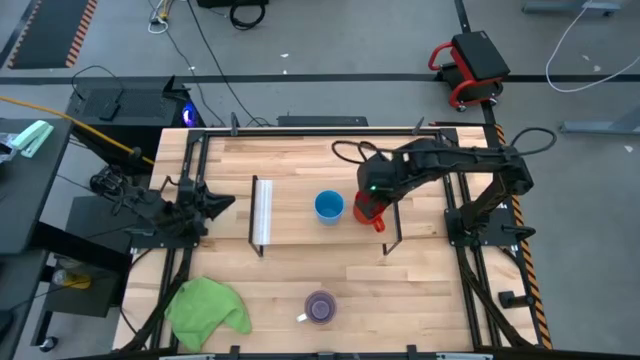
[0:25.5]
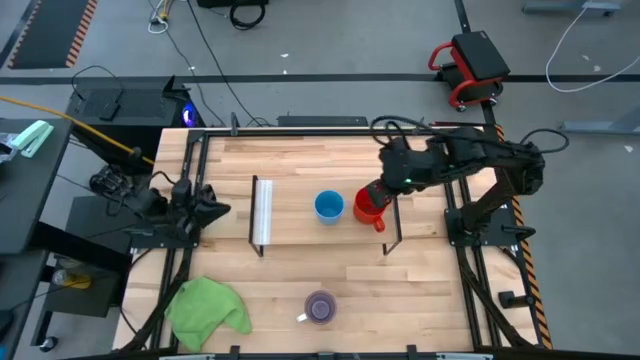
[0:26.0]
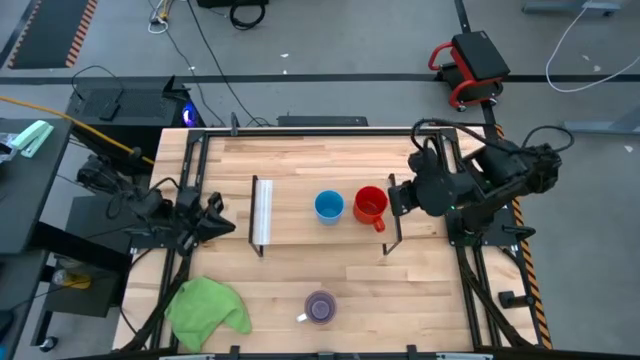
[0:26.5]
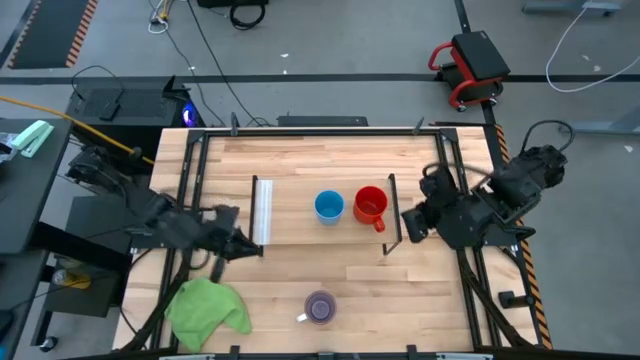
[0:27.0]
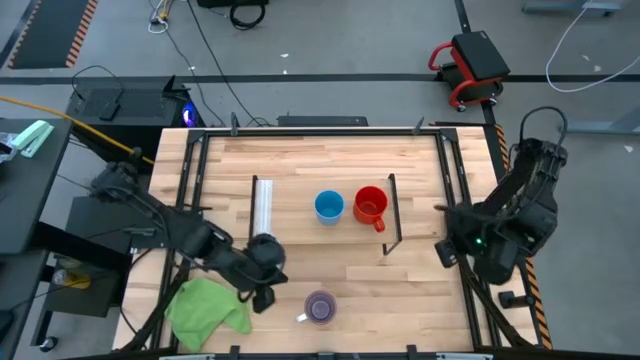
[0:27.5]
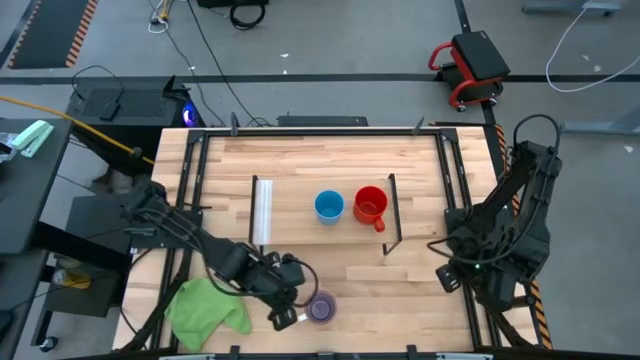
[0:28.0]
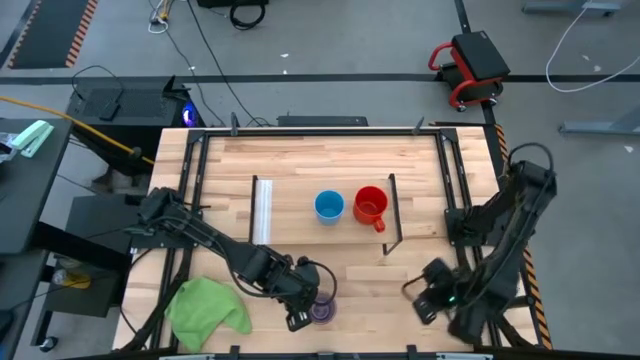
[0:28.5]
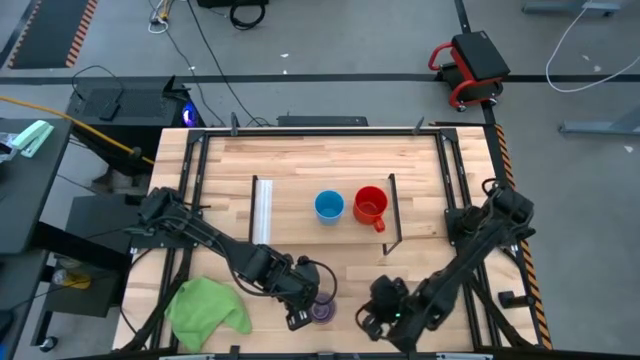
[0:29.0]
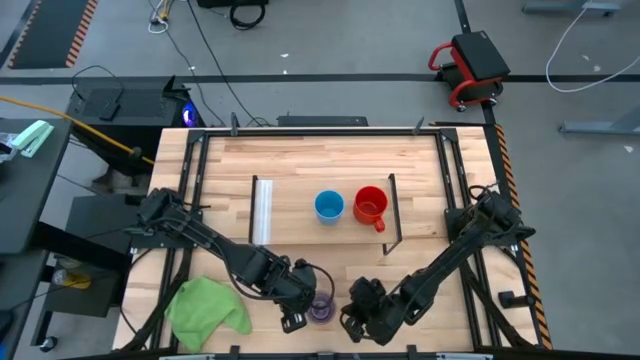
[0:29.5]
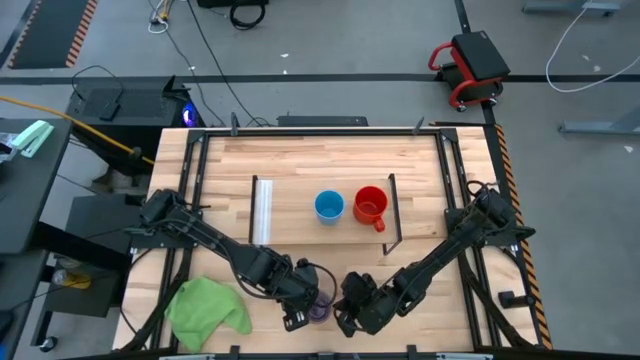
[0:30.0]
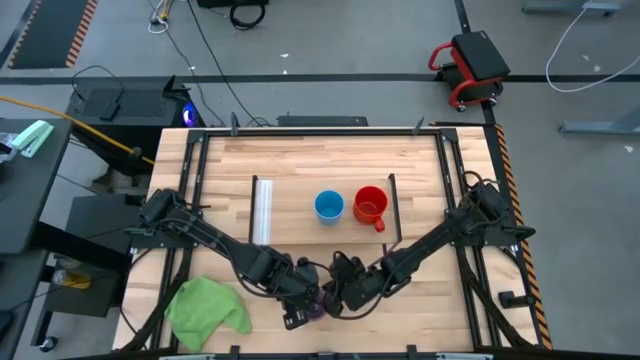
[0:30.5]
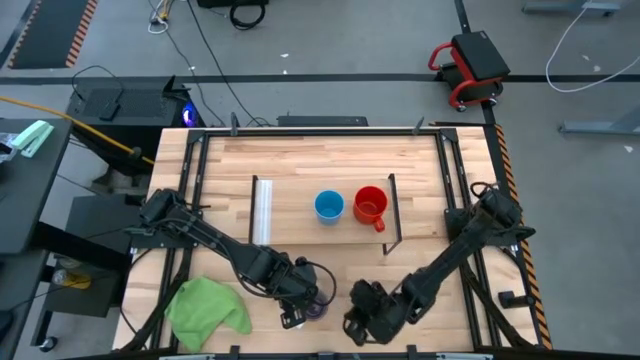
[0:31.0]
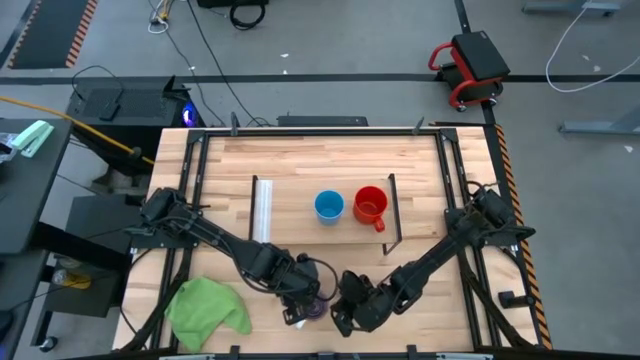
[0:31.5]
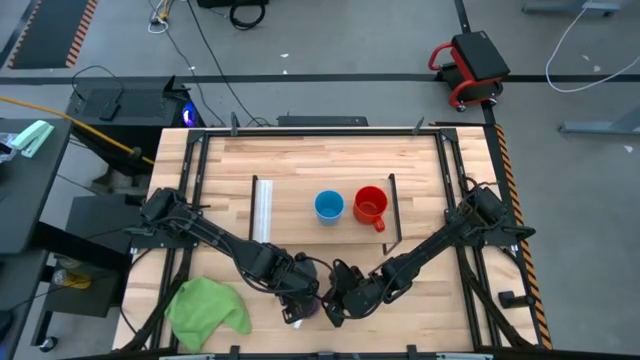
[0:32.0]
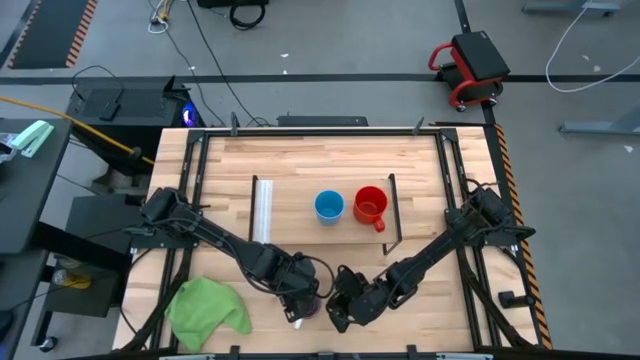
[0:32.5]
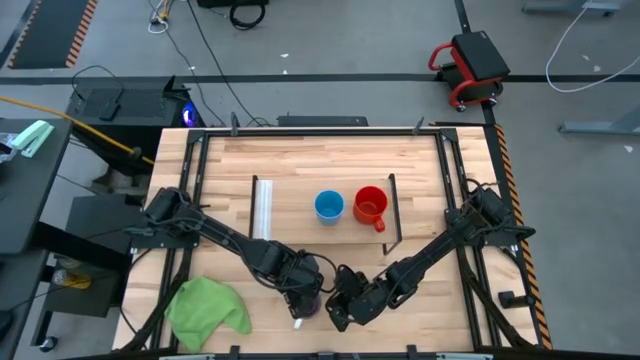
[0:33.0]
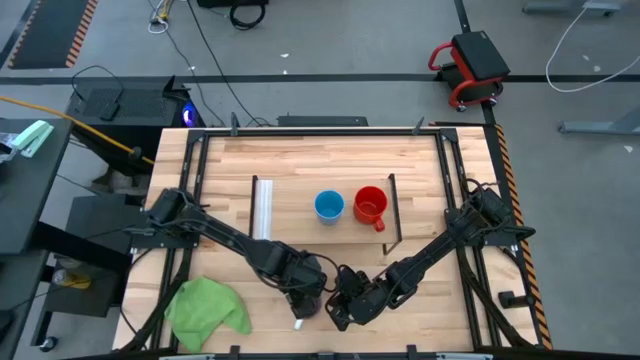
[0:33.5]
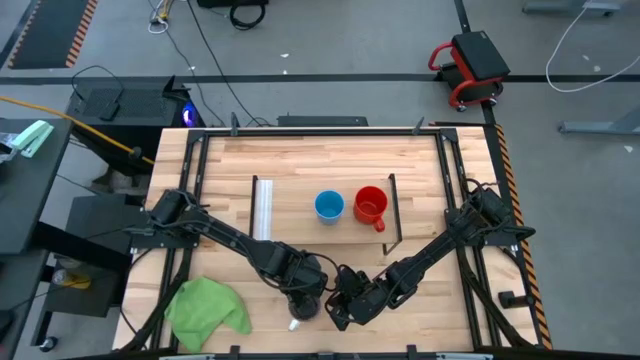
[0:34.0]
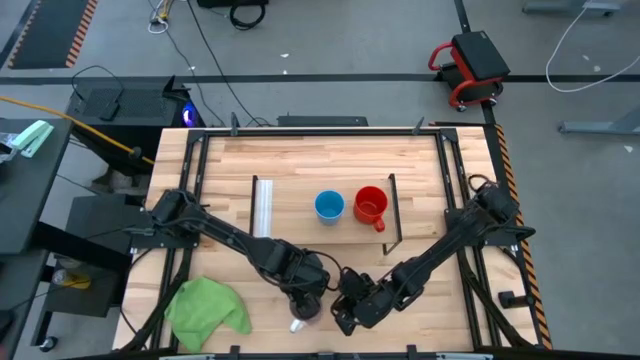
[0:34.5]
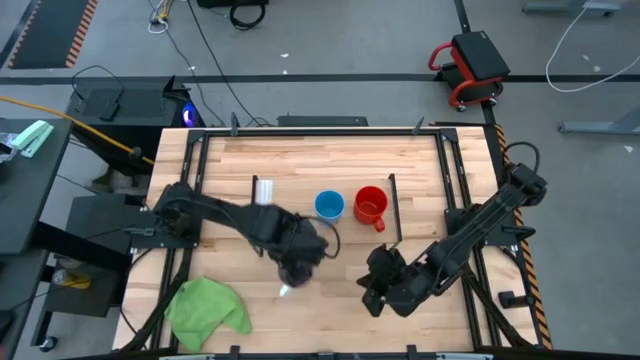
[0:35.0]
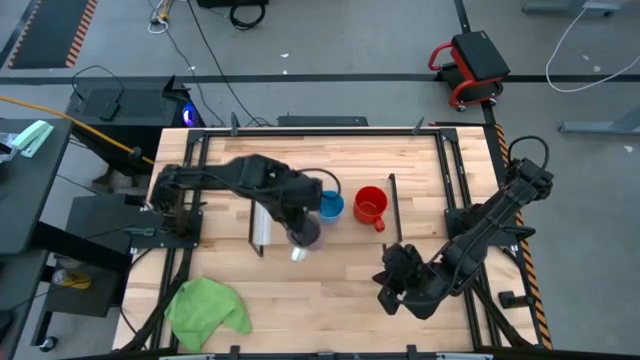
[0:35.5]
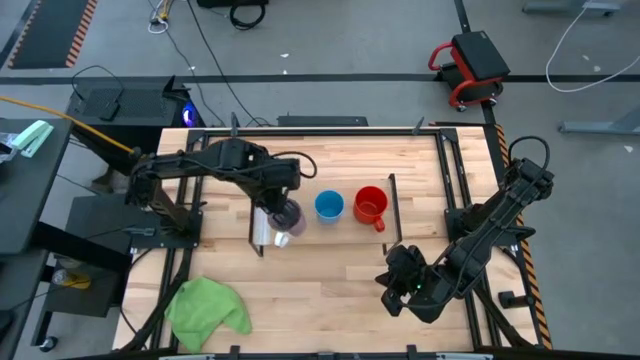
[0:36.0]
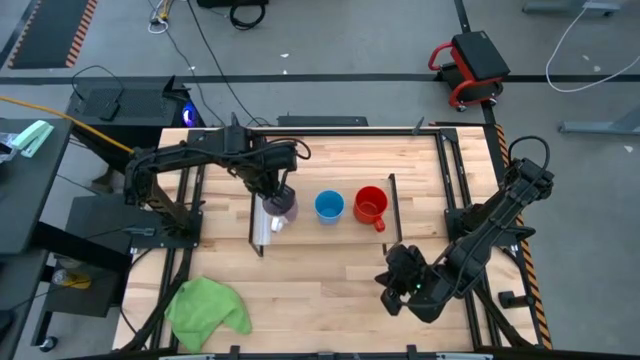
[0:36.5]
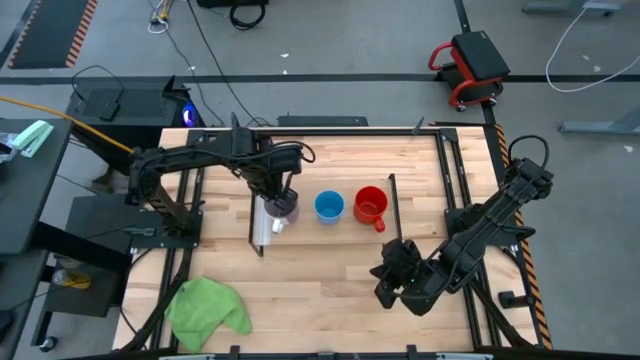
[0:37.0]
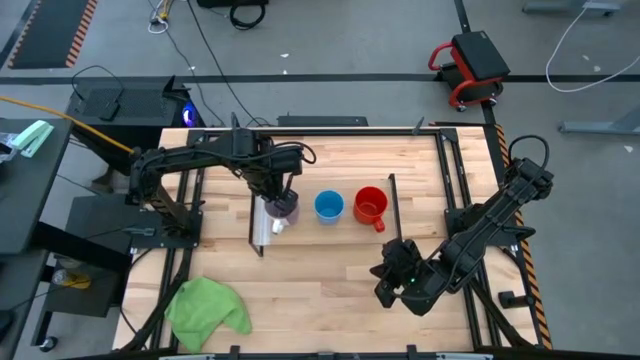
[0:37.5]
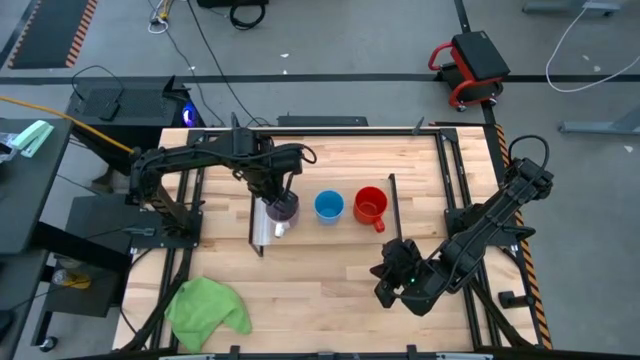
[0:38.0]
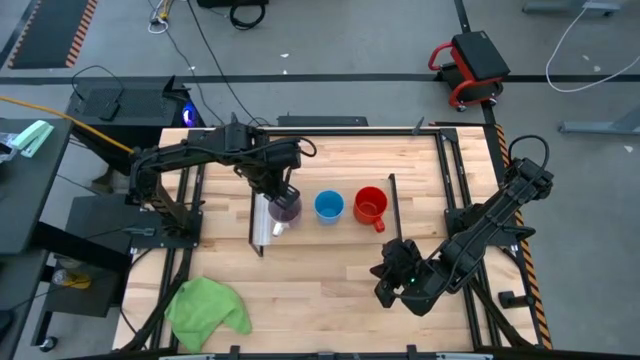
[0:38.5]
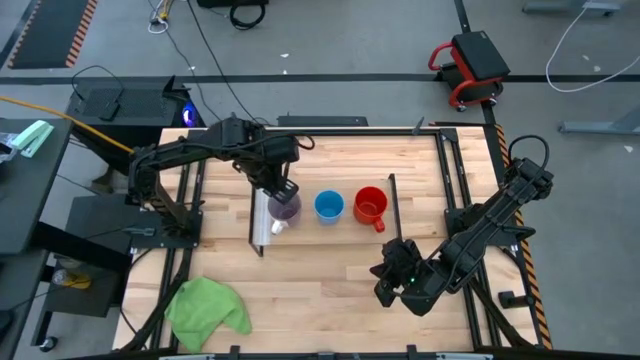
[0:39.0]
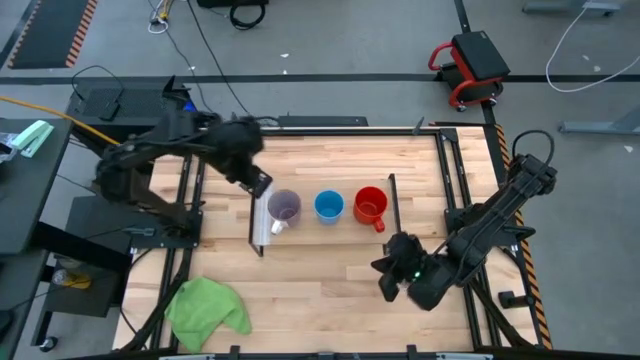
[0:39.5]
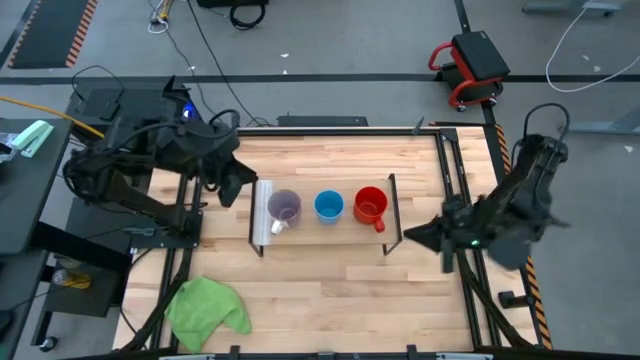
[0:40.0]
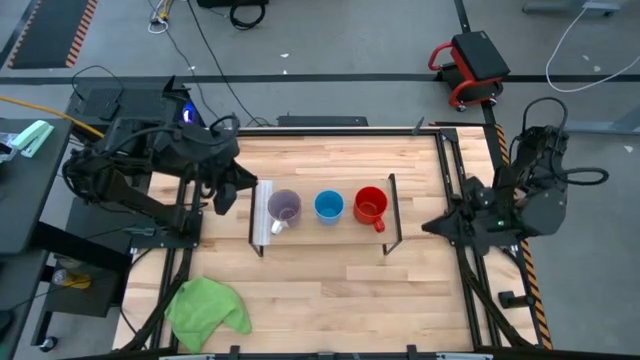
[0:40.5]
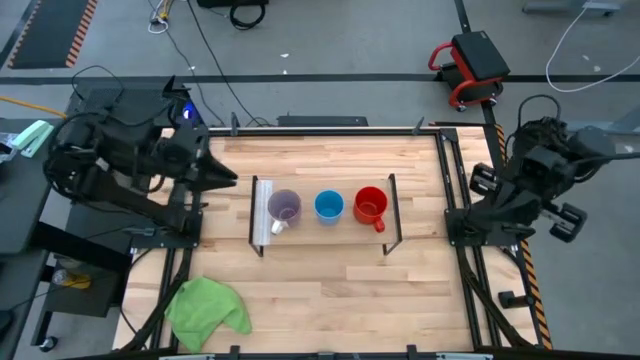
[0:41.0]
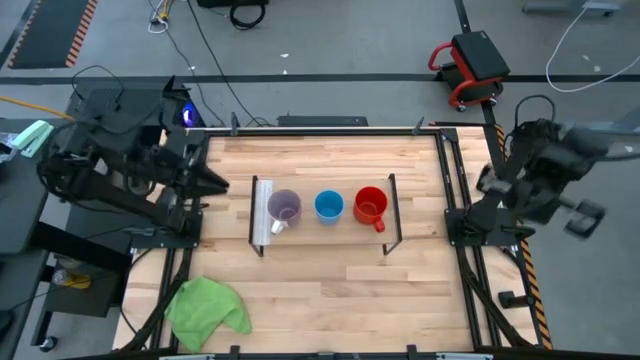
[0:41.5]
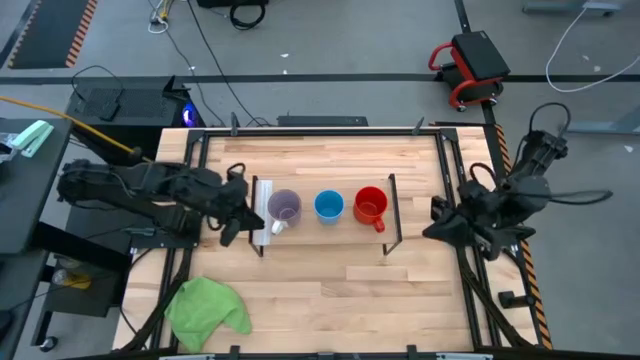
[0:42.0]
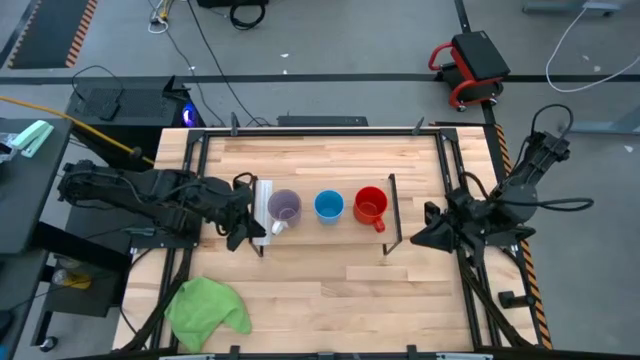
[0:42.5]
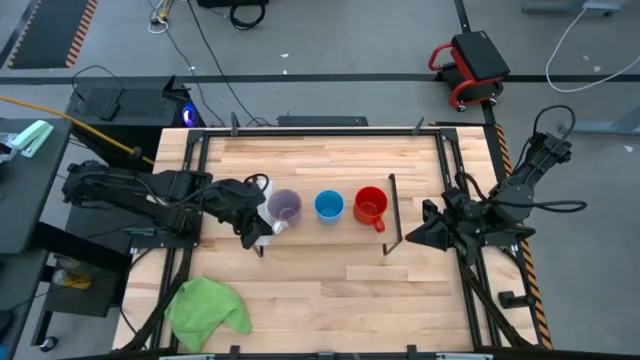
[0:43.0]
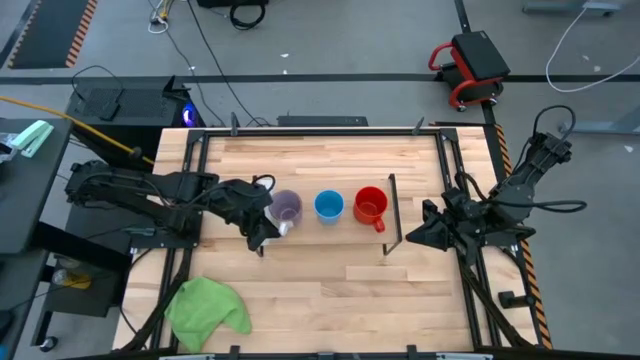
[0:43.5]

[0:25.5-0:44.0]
Task: Stack small to large cups/mugs on shelf
Put the purple mug to the left of the blue cup on the shelf
